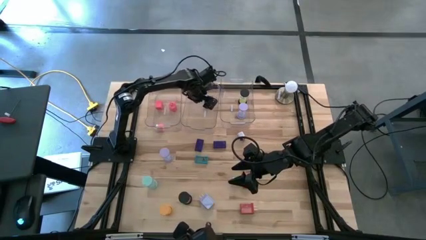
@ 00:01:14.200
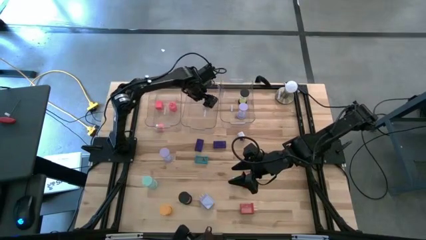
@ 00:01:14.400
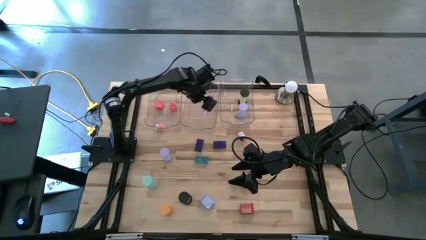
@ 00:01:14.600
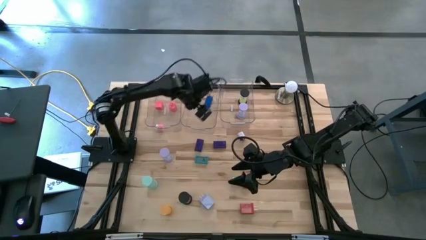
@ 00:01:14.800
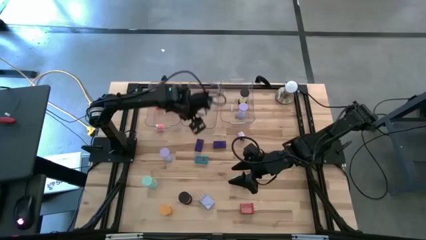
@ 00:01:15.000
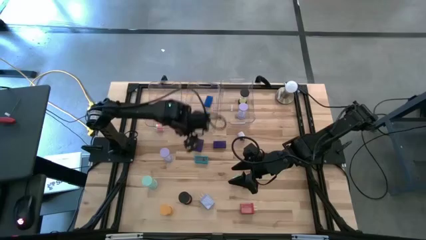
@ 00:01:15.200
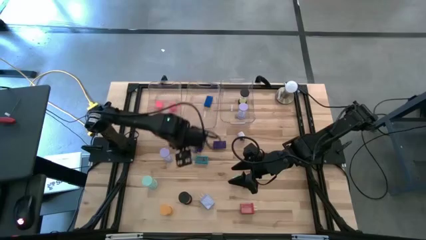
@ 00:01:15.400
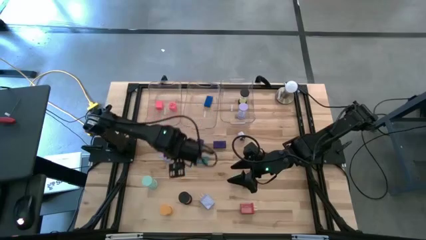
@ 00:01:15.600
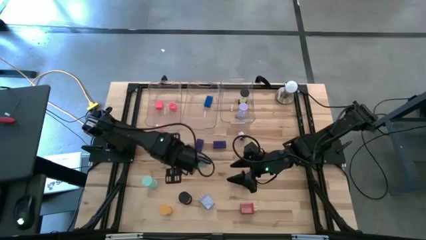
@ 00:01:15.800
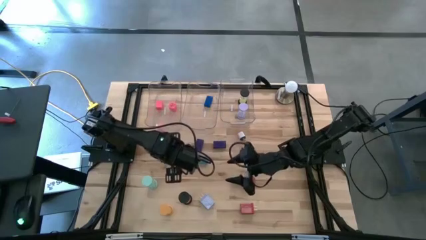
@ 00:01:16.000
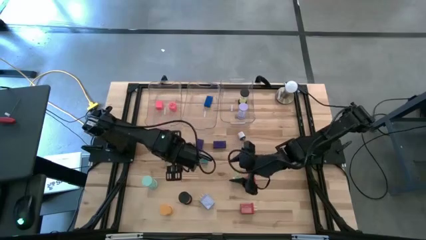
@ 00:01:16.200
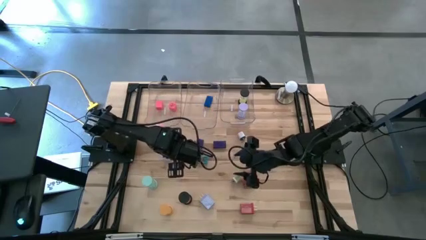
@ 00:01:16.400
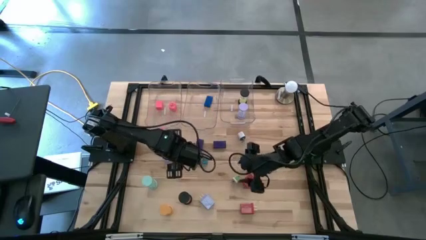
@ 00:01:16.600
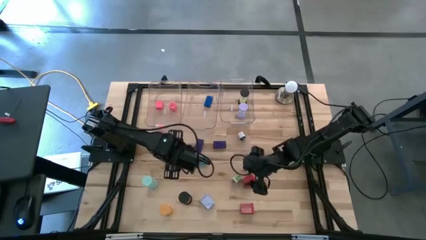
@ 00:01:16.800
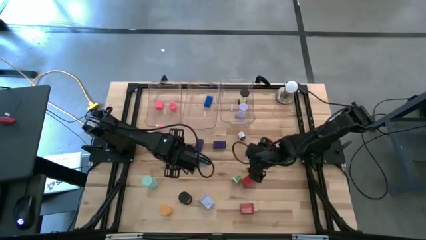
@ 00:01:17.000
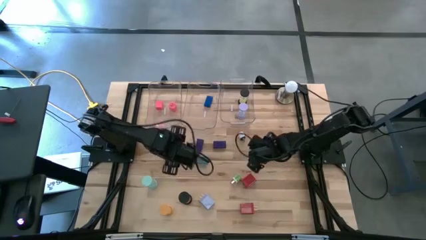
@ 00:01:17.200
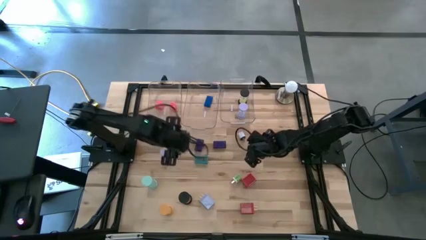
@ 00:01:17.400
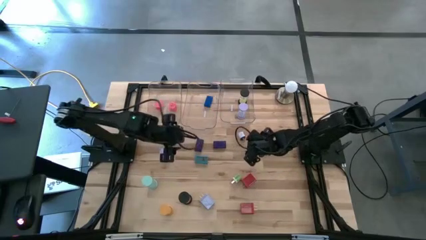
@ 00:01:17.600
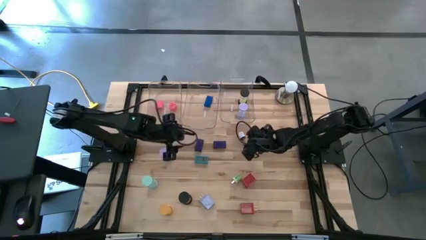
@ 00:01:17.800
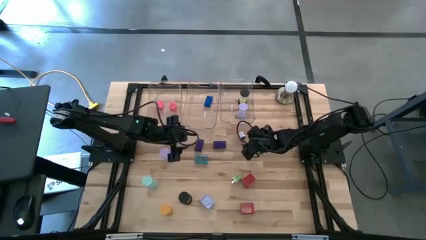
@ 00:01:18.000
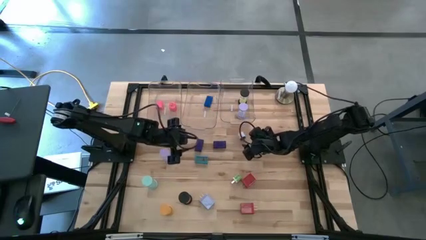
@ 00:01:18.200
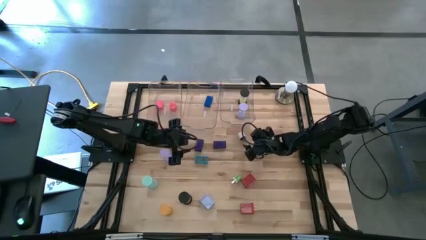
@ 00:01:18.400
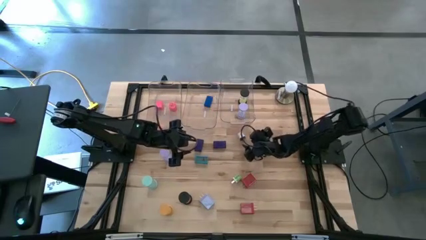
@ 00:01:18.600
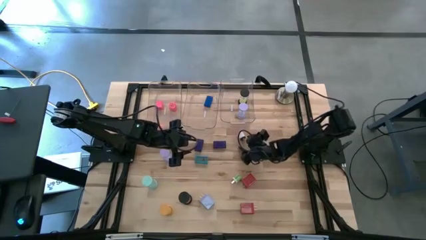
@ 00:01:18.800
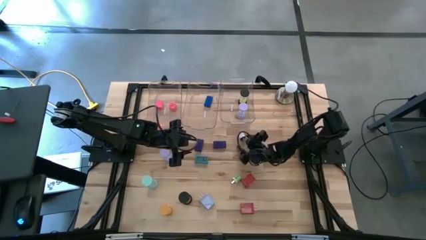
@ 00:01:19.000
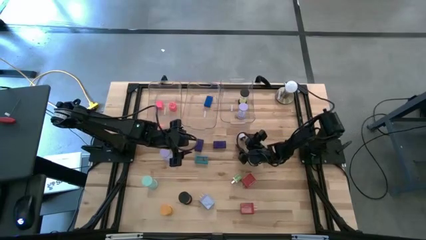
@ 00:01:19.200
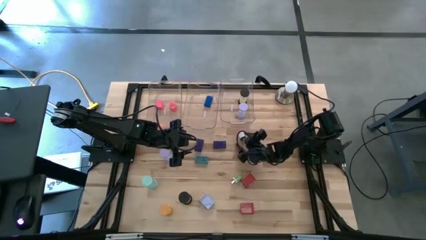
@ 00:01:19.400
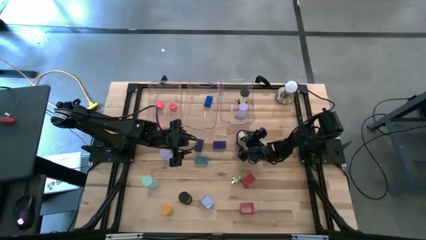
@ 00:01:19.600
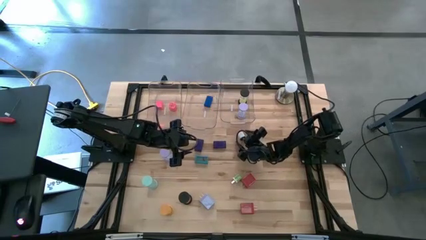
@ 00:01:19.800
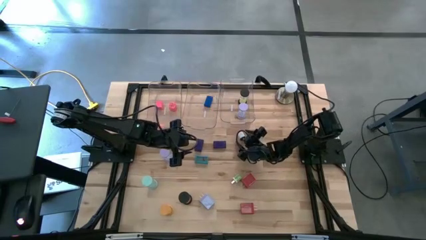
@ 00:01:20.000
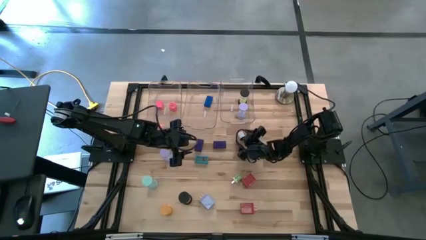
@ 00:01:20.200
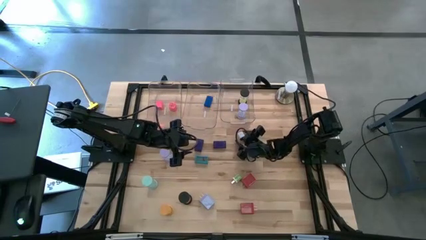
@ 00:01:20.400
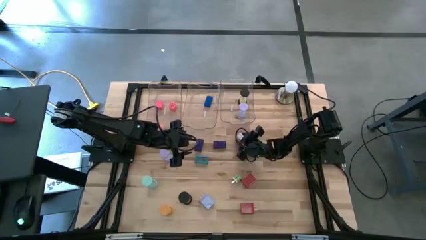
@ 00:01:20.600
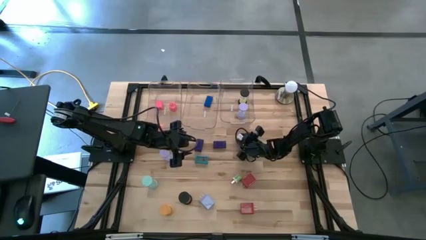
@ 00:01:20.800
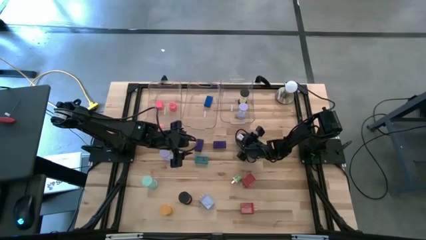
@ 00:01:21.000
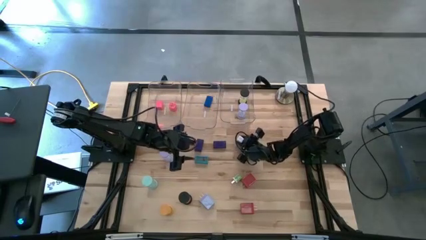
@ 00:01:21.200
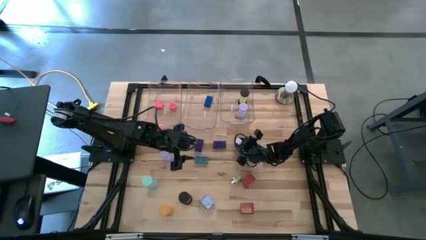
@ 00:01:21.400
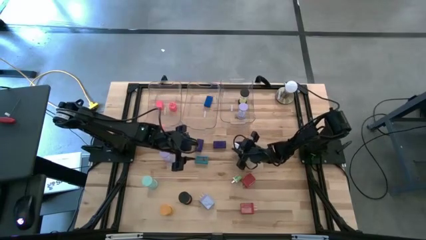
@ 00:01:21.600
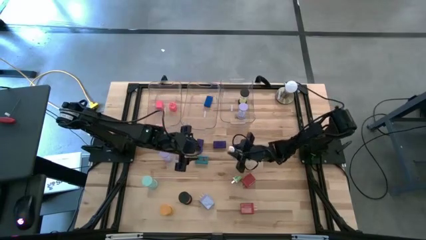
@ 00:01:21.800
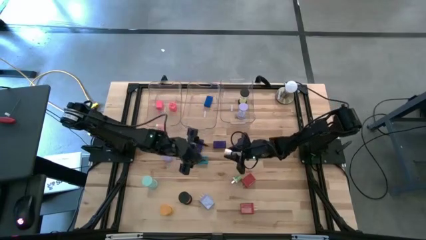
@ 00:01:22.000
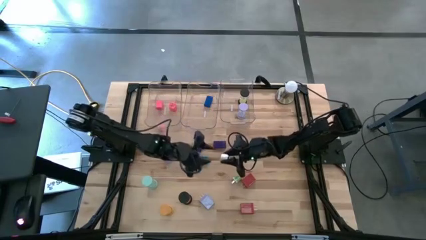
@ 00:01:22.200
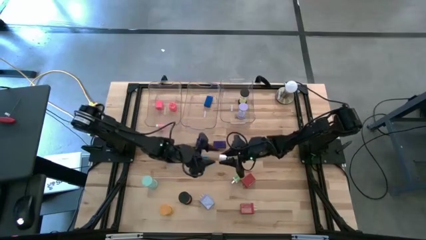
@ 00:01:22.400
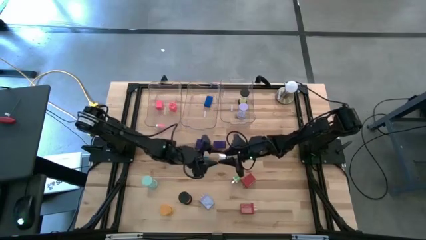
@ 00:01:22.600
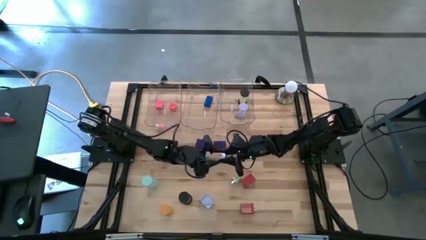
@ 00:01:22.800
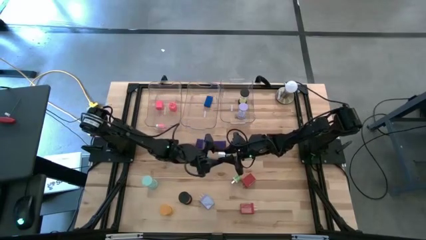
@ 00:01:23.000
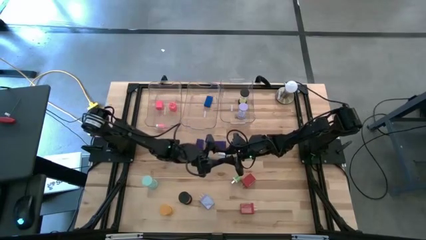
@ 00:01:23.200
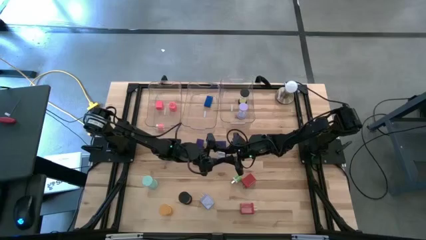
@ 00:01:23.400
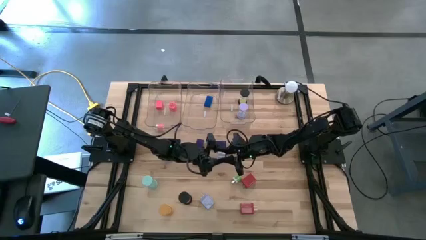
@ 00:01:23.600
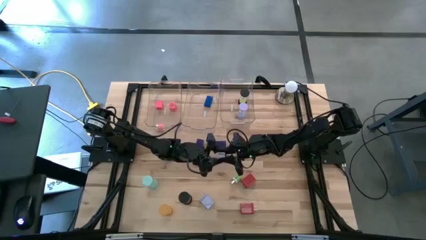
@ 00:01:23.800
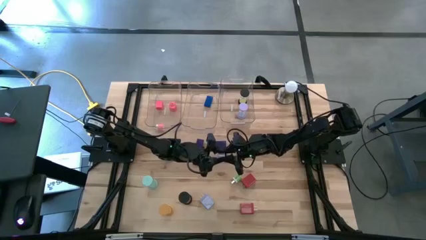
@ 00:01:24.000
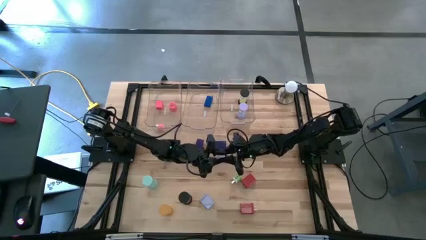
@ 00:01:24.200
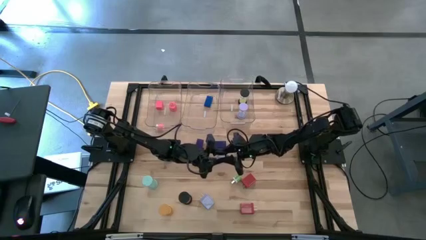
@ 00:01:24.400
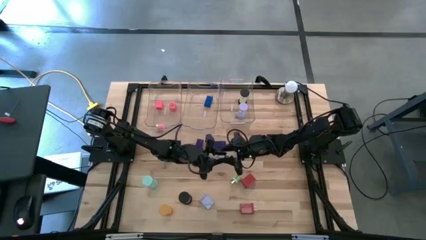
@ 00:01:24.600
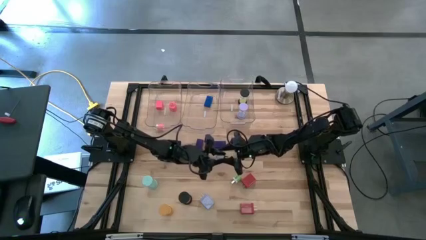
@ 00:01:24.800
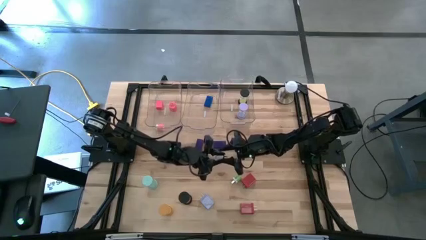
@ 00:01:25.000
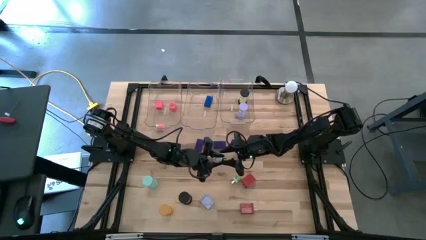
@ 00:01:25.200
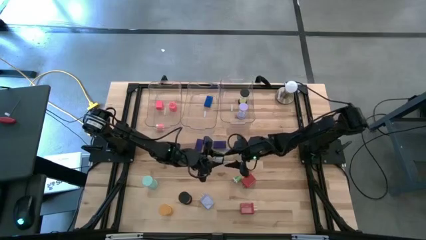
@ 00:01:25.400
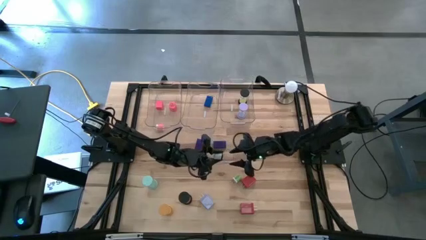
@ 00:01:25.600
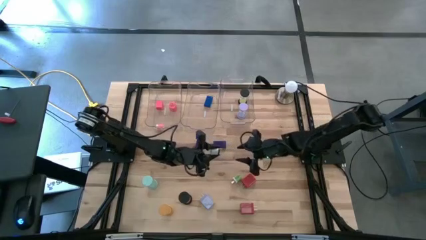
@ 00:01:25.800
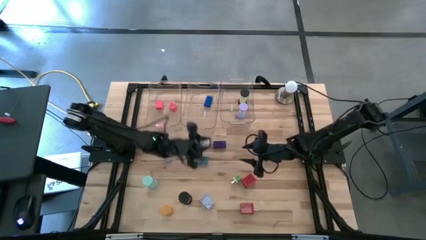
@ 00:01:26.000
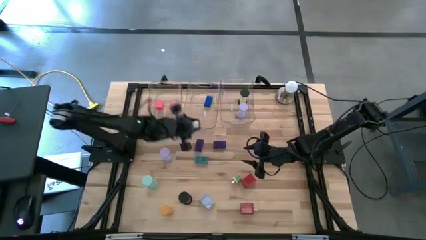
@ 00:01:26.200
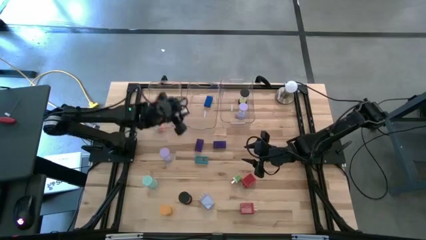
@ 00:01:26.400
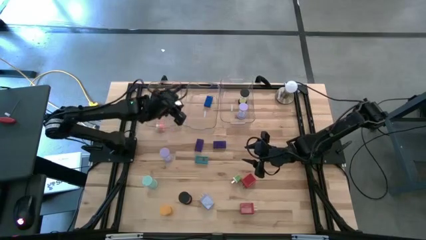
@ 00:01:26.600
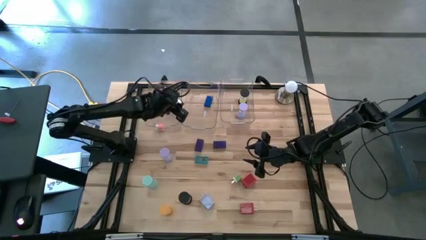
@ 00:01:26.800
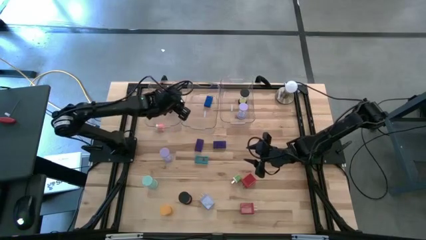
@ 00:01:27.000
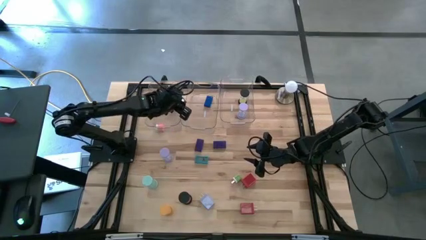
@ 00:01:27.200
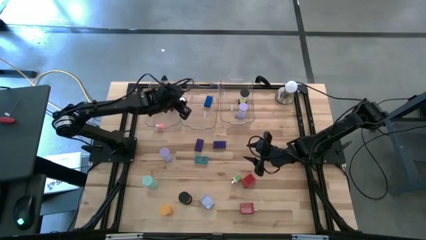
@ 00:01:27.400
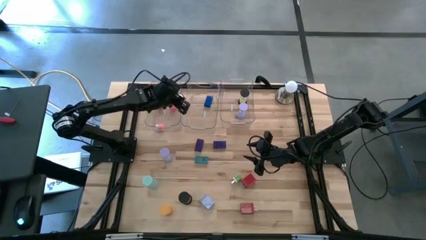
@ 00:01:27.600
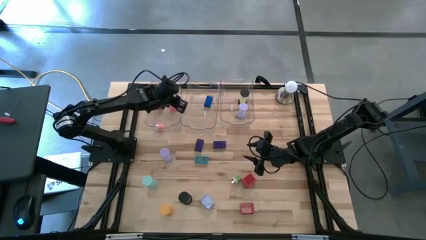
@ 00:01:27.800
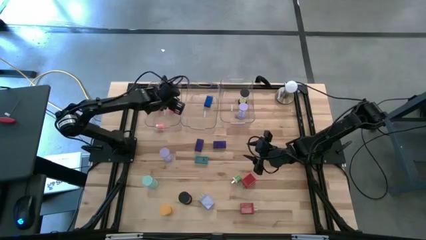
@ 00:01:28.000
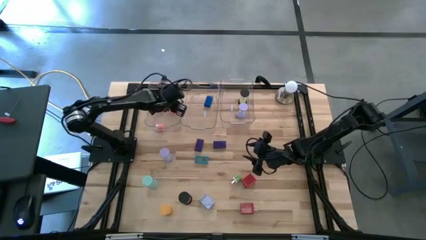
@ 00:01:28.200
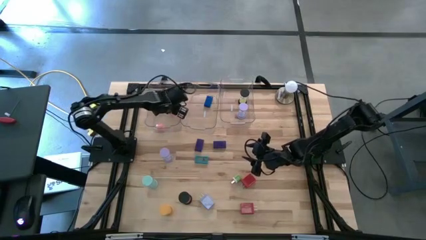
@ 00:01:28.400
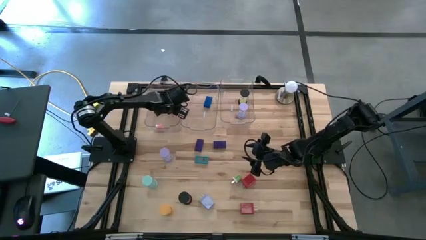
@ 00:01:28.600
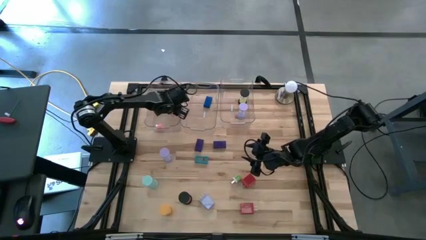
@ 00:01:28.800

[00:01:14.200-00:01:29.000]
Task: Pick & Place Office items
Put the white charger adapter into the left transparent bin

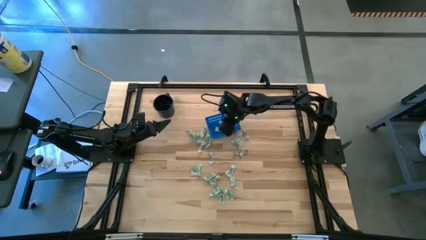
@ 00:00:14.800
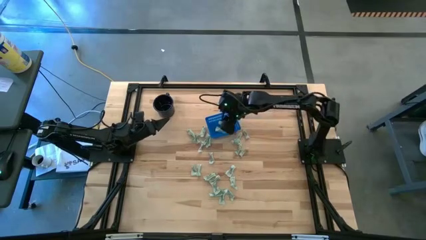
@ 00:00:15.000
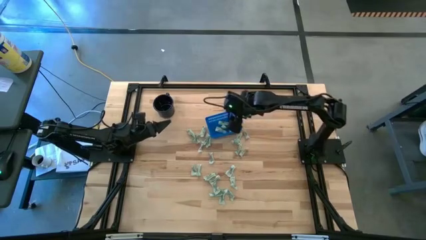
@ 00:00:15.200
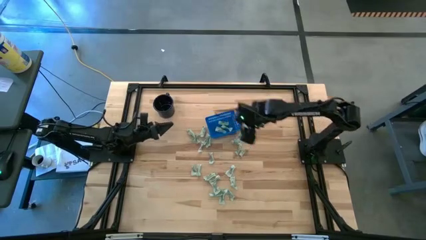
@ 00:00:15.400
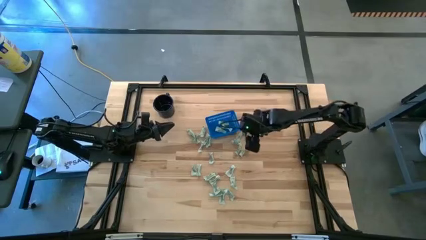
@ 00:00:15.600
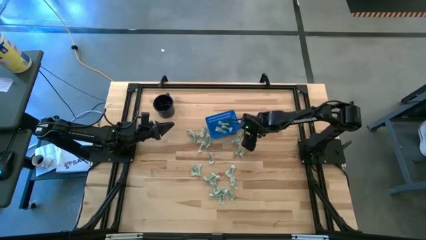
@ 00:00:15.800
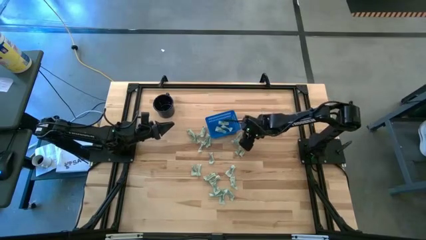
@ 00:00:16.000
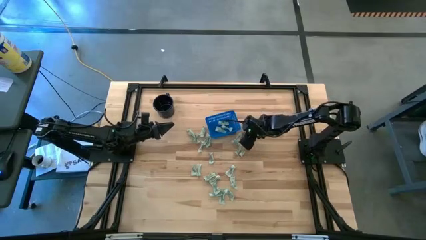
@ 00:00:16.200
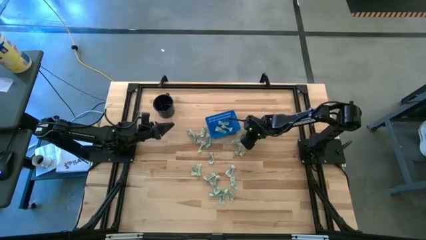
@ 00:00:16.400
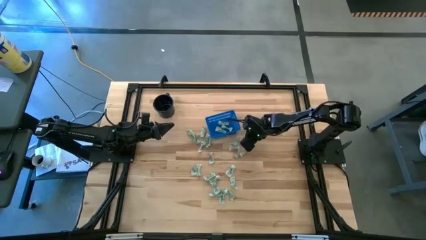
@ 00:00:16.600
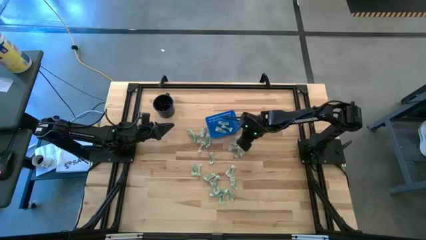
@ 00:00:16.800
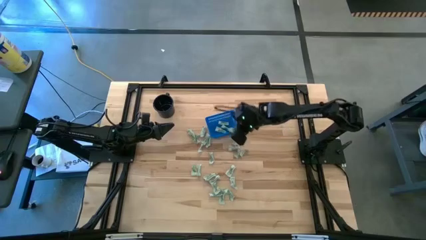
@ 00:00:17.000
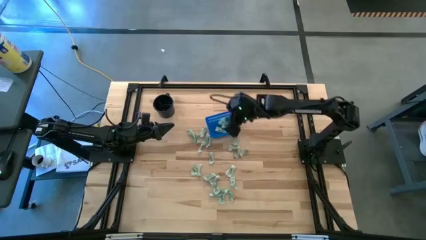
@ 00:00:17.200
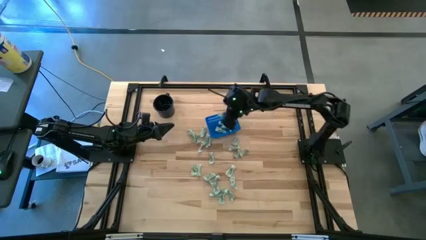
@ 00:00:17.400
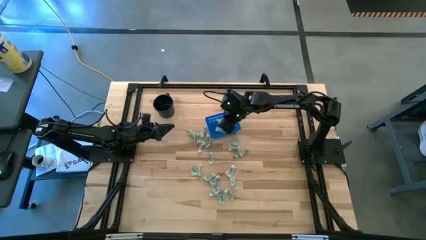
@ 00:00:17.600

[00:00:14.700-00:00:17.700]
Task: Pick and place Stevia / Truvia into bins
Put the green stevia packet into the blue bin
